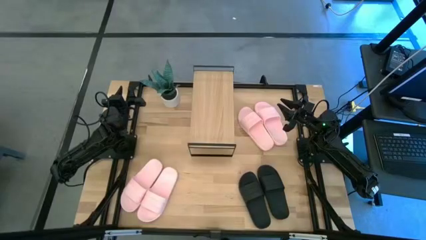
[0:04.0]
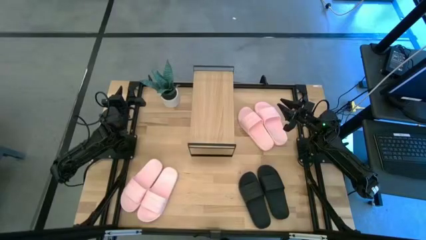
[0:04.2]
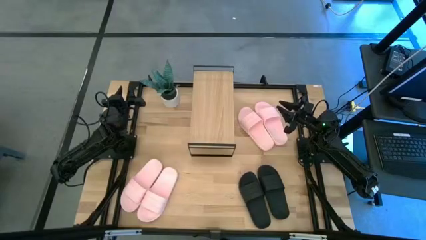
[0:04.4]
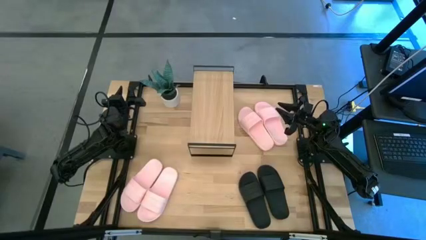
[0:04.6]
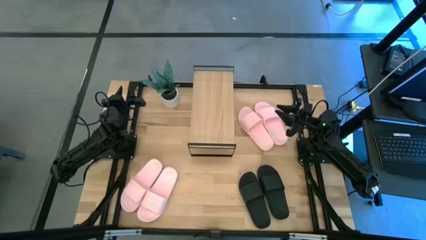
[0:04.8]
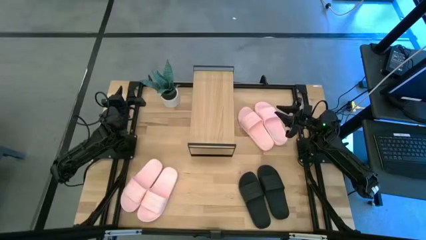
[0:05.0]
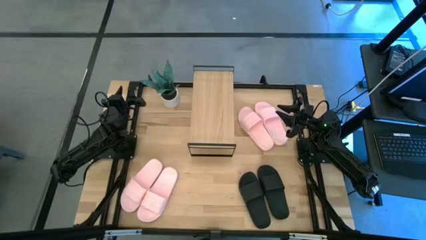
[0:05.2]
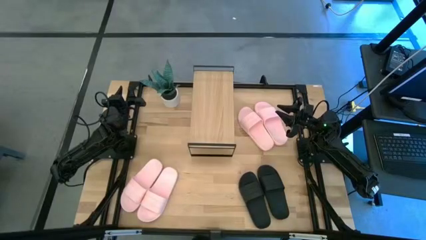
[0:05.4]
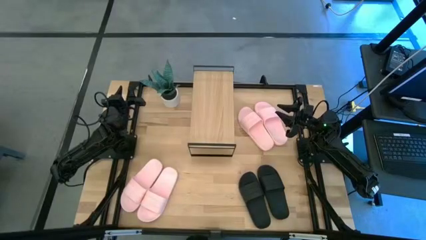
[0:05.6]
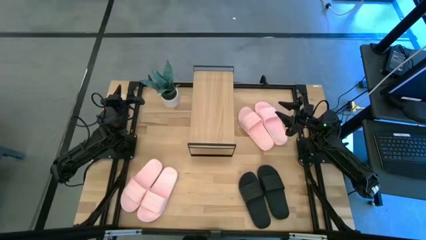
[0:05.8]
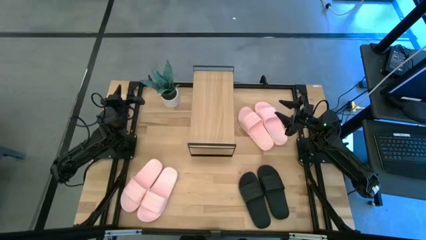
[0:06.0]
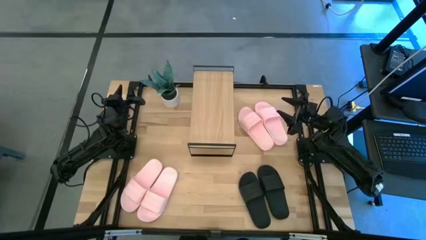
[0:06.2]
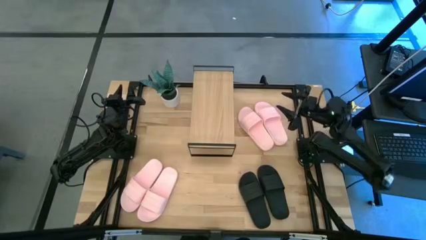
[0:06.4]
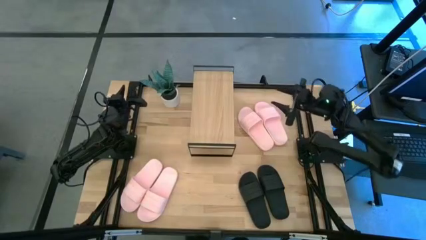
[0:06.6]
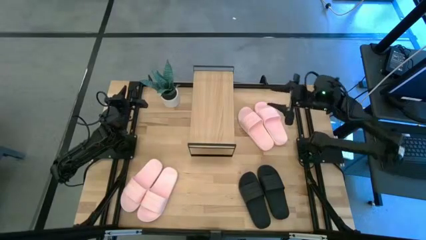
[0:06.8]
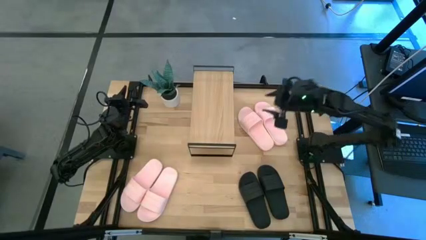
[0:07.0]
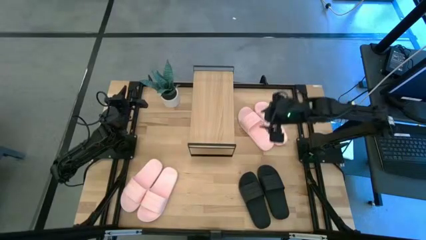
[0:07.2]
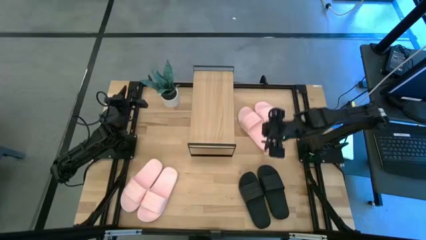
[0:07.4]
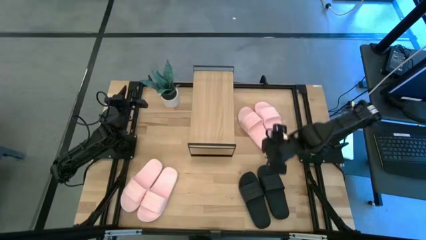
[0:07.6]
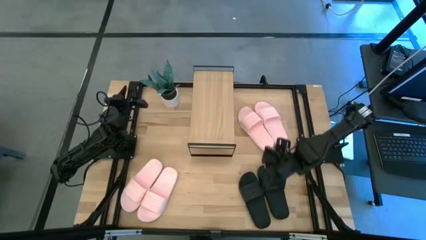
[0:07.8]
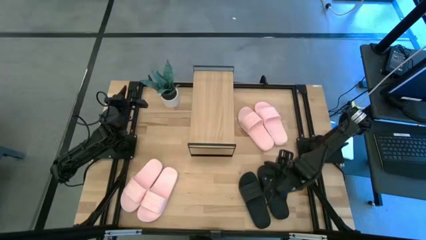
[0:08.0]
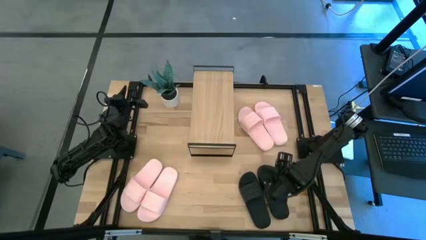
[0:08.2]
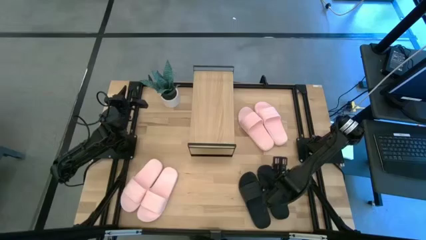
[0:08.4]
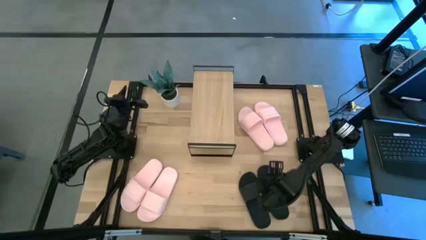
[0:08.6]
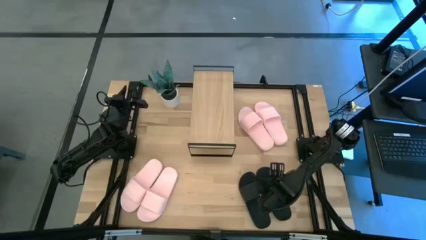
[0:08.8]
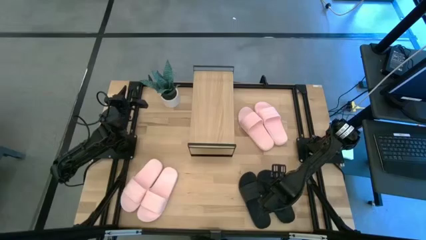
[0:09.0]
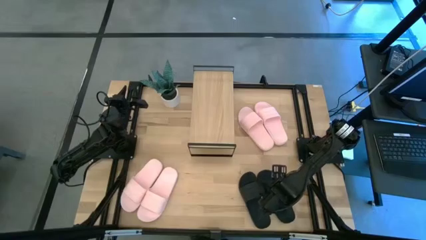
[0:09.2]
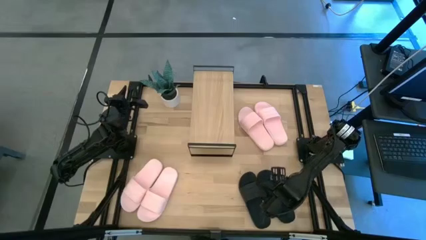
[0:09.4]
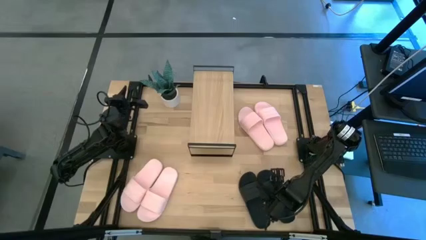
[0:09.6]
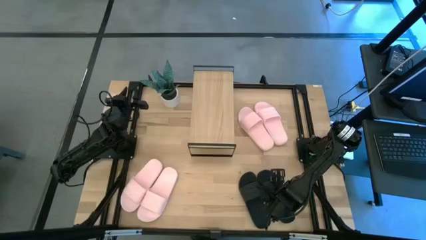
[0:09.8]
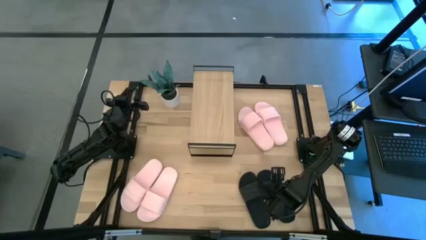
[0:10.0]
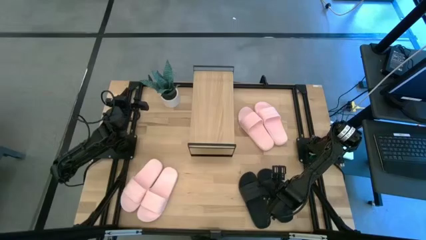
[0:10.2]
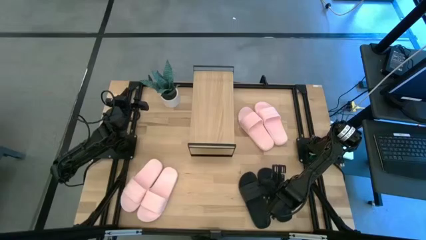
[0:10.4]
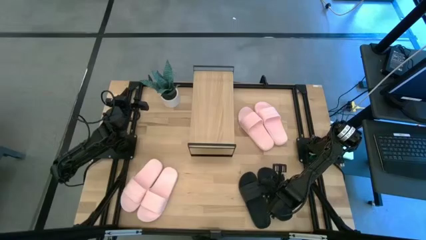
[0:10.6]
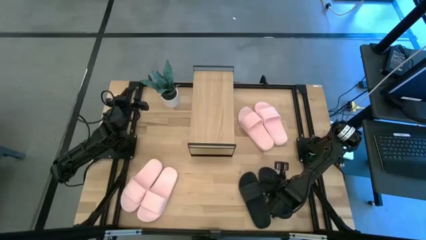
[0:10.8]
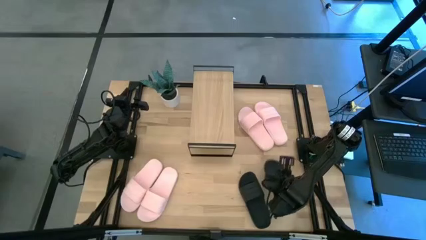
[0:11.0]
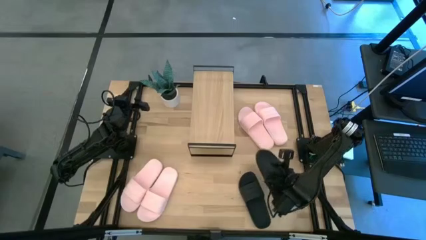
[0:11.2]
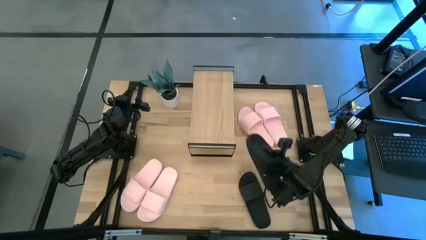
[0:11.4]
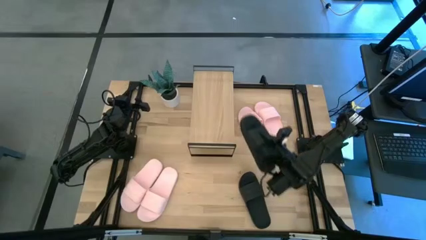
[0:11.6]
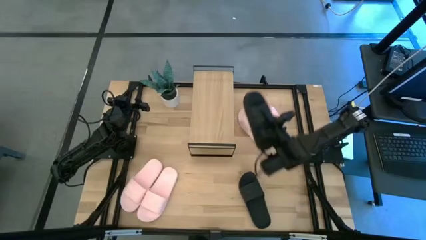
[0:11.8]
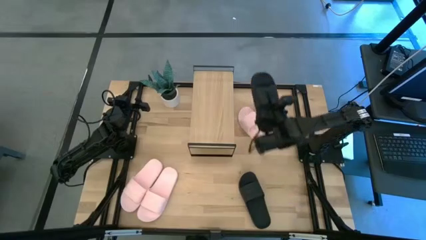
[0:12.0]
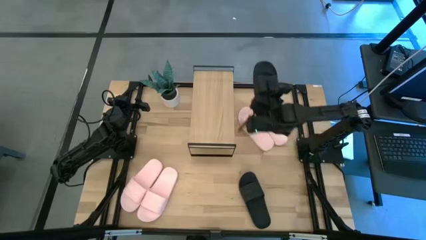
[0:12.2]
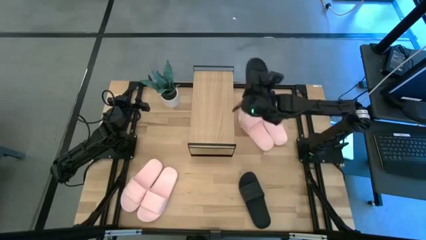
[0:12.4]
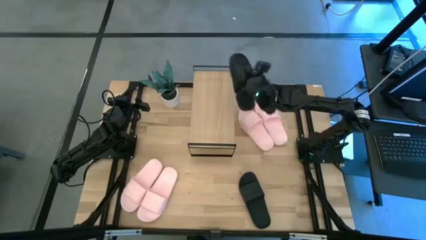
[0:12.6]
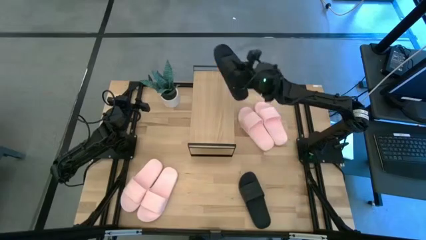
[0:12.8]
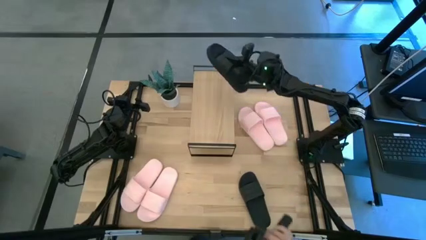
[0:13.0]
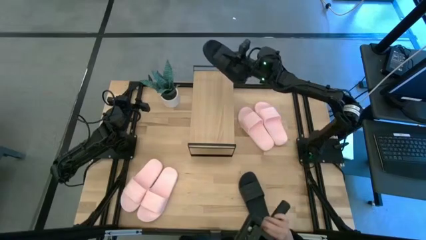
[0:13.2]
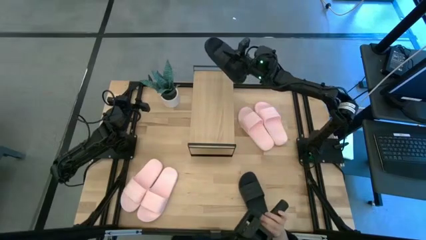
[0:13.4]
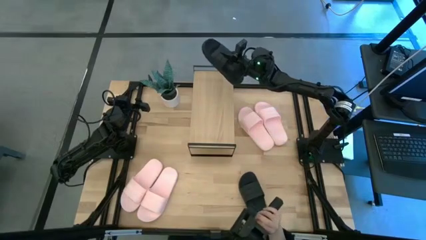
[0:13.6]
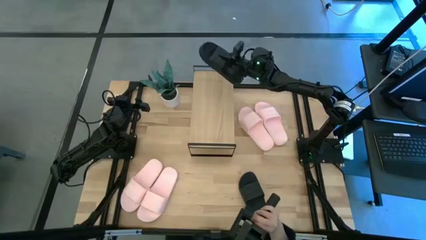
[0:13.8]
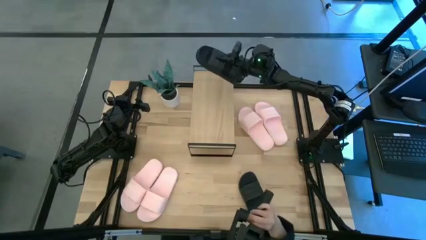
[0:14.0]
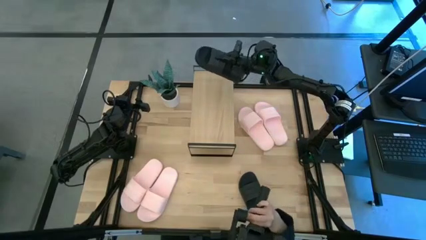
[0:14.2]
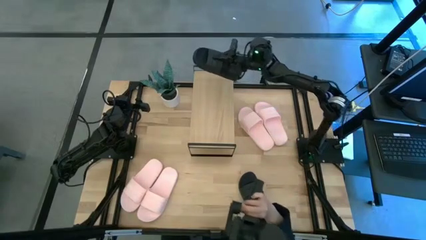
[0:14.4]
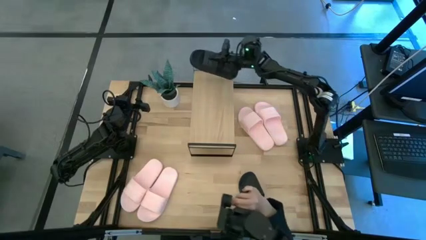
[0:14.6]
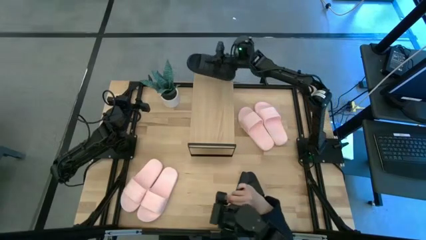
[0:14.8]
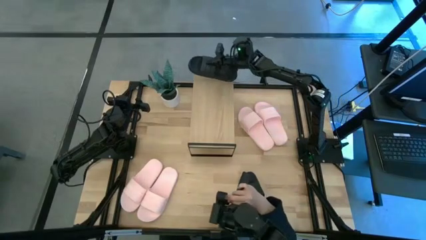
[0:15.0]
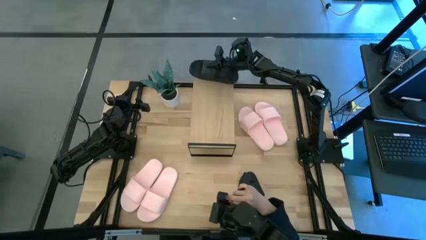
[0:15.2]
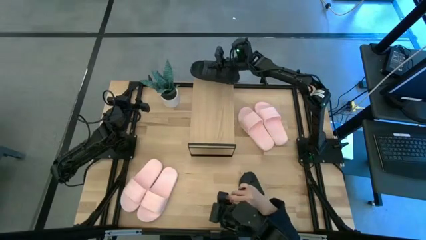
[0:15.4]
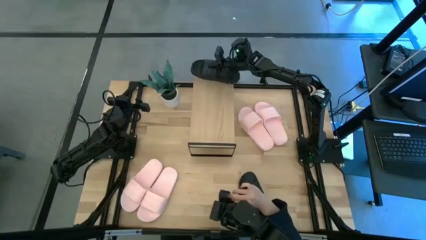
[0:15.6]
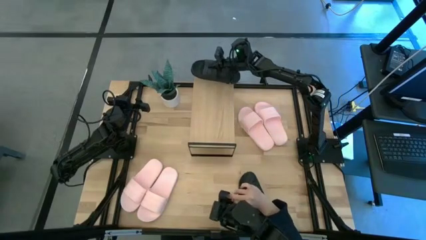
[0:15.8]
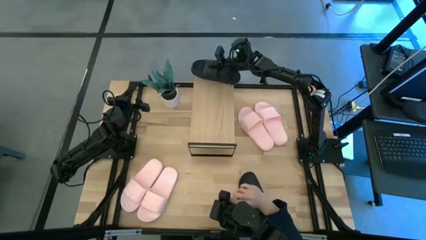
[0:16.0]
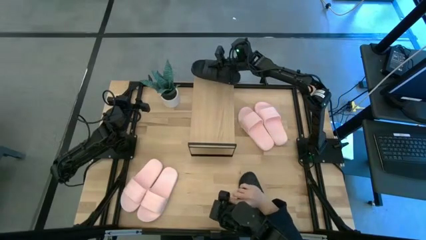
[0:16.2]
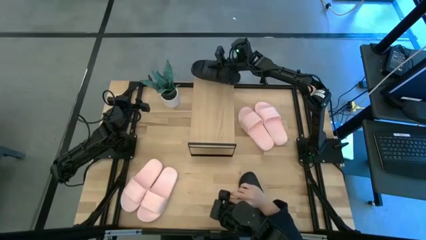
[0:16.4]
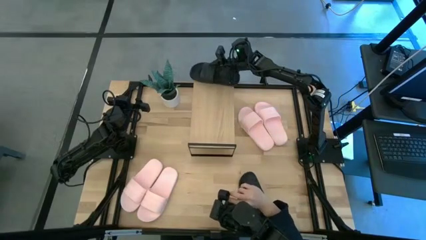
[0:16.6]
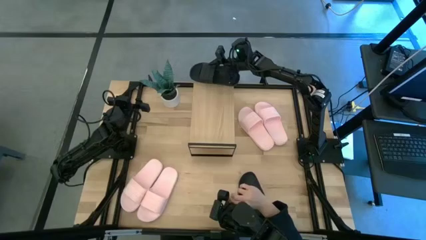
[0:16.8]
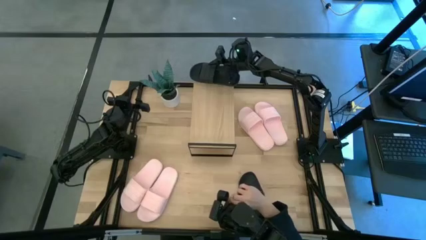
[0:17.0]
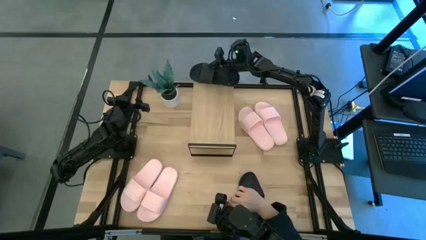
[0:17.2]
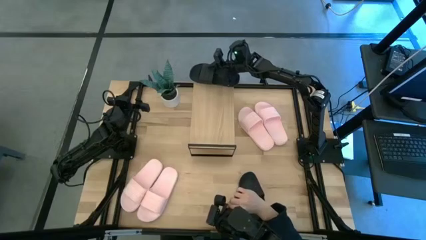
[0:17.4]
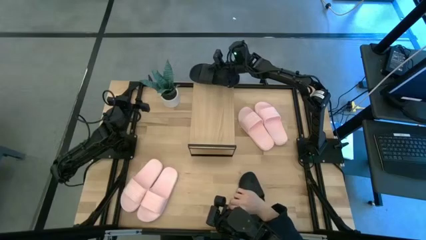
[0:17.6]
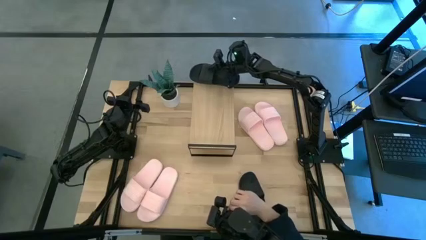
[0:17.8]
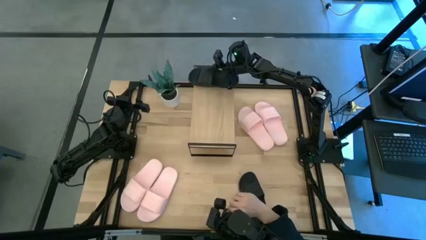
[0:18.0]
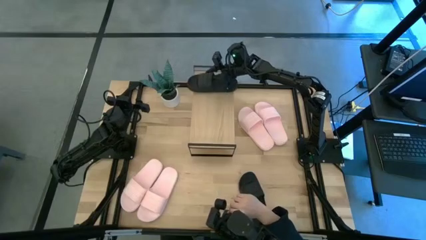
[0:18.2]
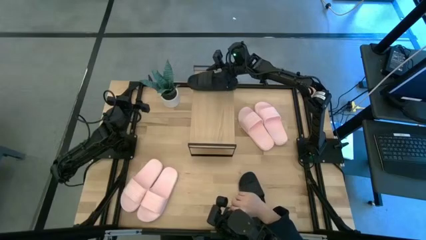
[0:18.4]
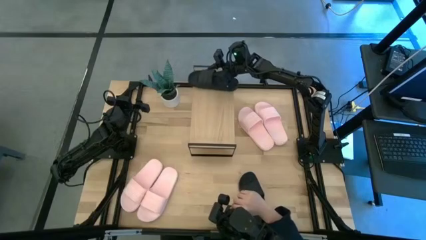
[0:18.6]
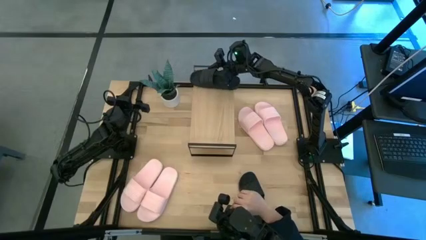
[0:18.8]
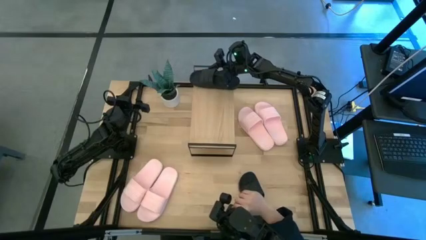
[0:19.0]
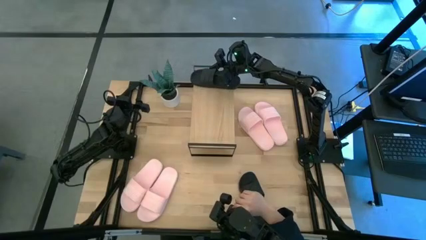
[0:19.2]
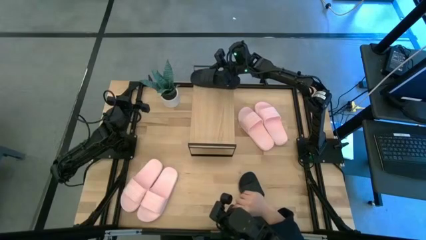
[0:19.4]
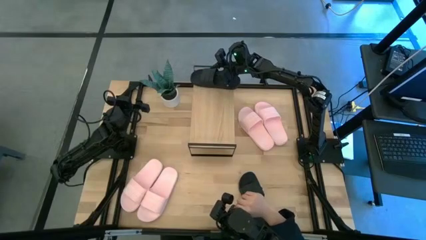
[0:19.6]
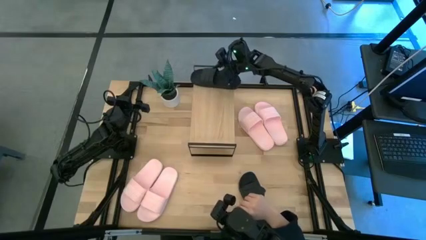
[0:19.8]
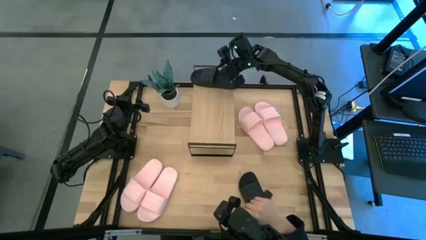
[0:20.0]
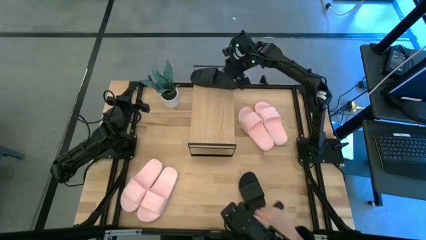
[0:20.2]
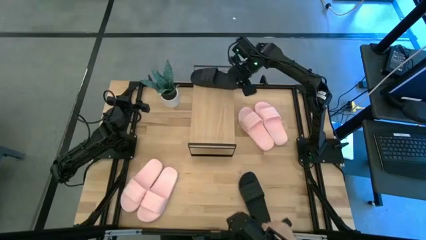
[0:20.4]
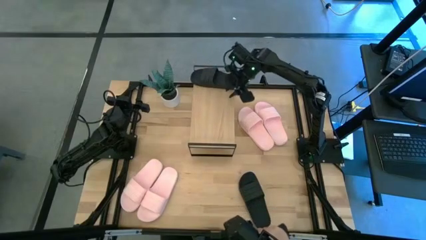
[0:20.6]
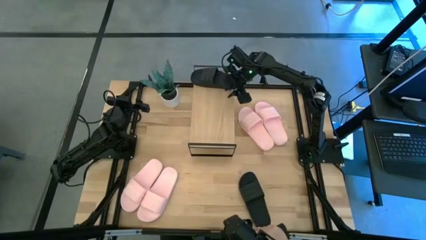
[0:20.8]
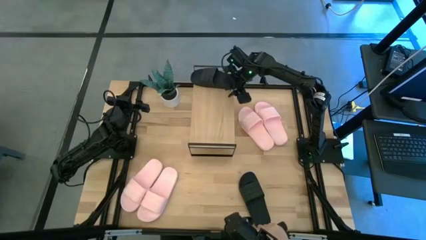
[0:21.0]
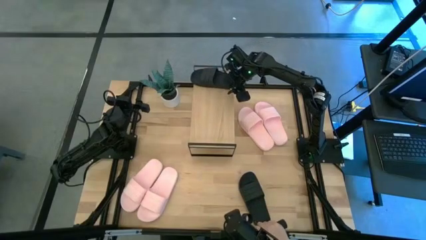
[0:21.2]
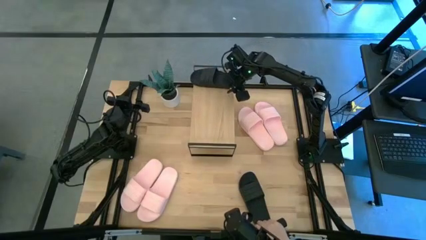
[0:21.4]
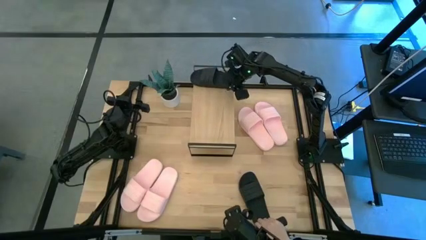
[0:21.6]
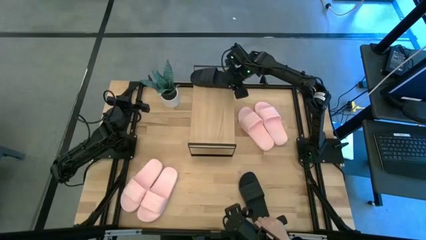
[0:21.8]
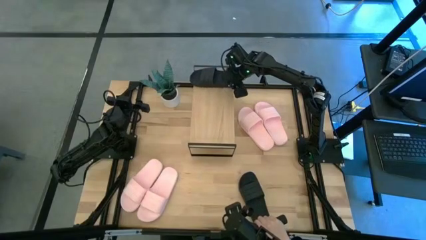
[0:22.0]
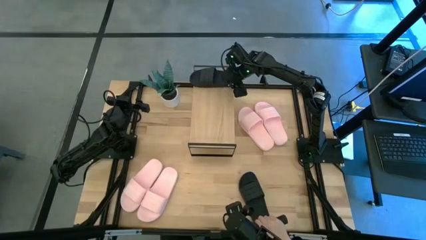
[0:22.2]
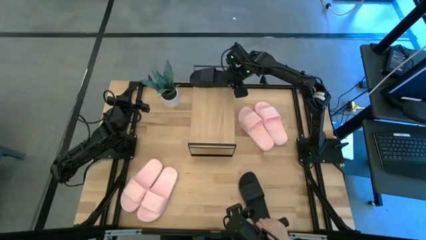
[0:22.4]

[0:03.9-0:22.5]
Task: Pick and place slides into the shelf
Put the black slide on the shelf
